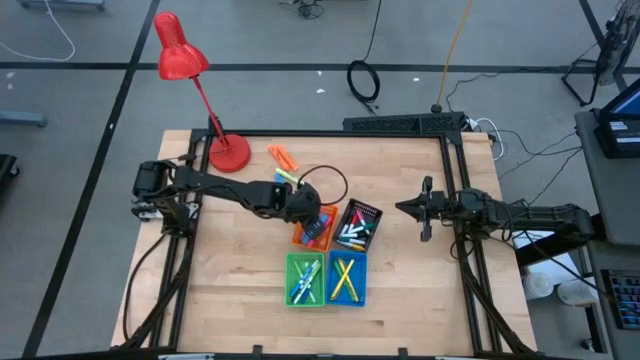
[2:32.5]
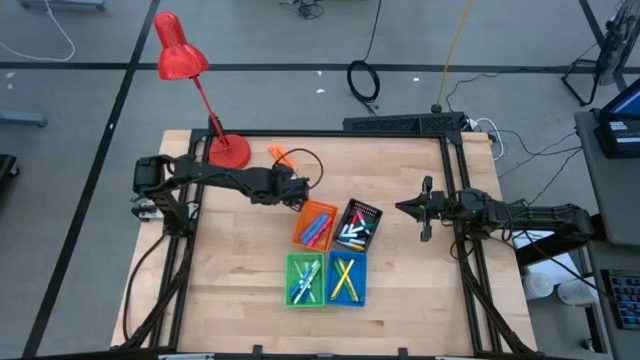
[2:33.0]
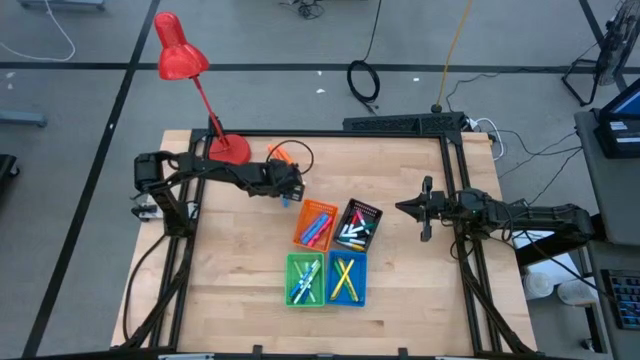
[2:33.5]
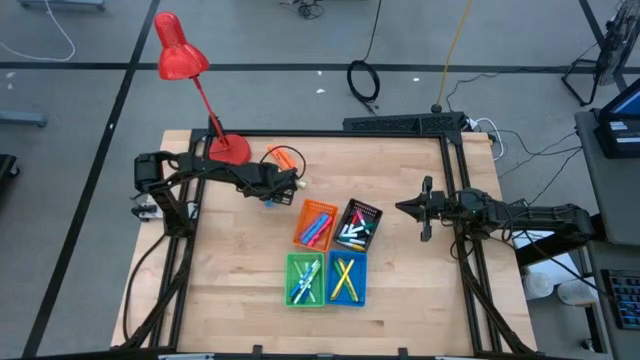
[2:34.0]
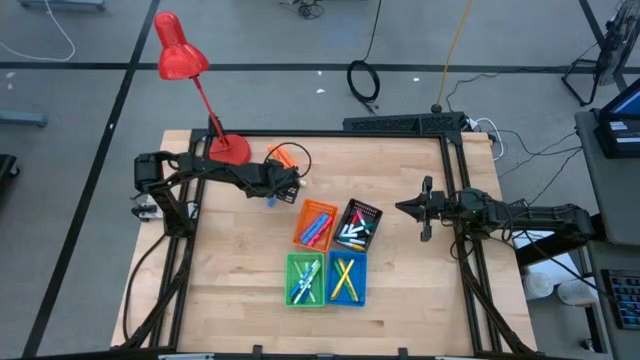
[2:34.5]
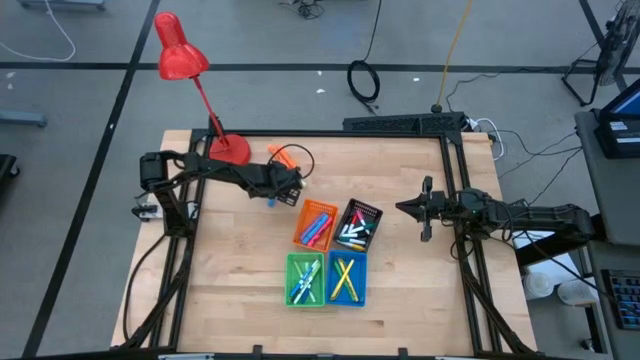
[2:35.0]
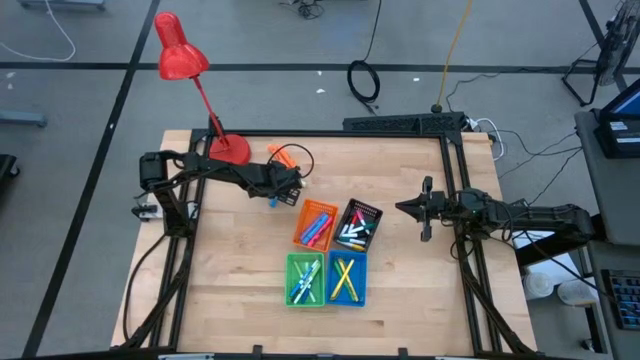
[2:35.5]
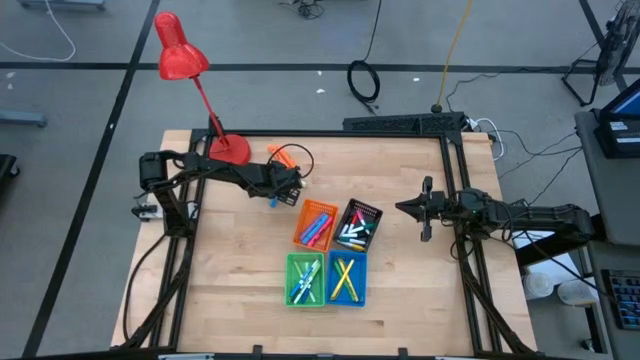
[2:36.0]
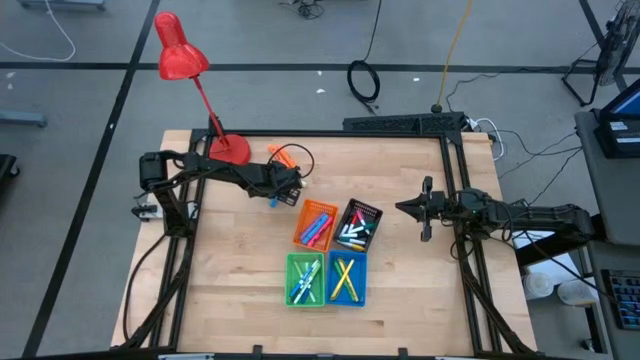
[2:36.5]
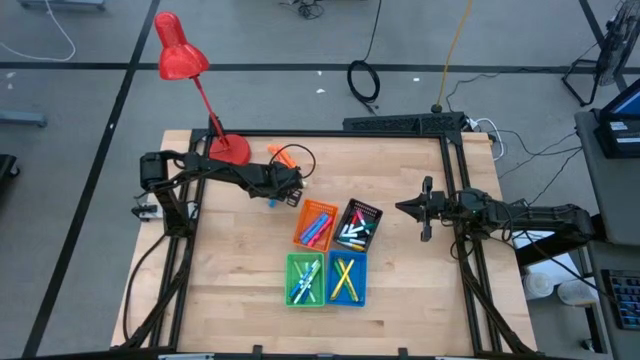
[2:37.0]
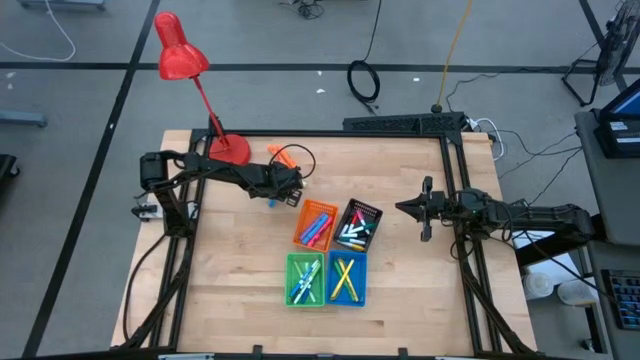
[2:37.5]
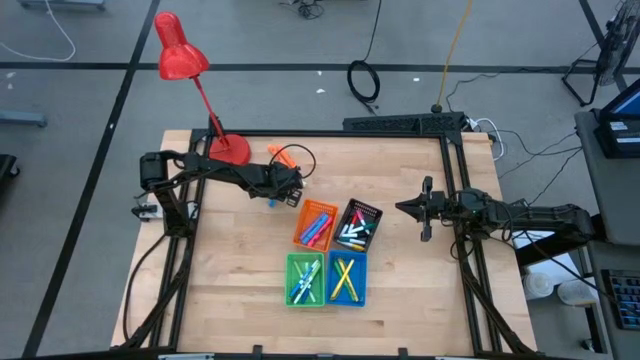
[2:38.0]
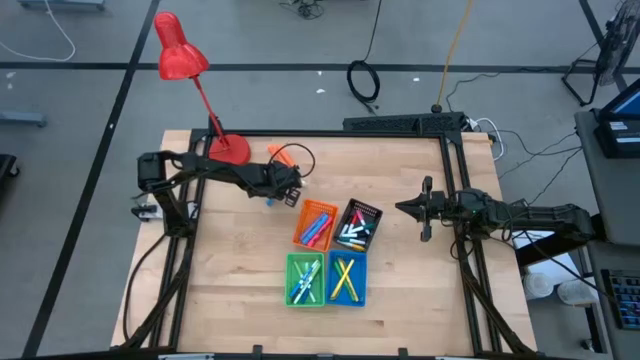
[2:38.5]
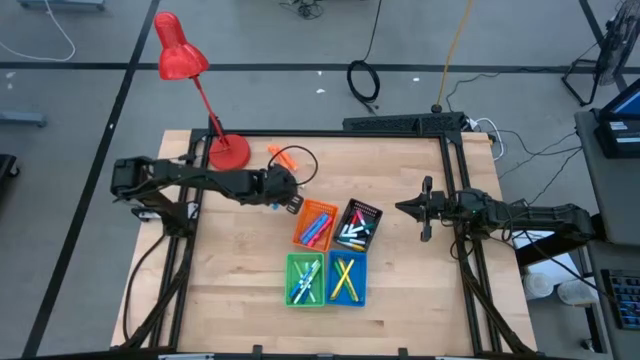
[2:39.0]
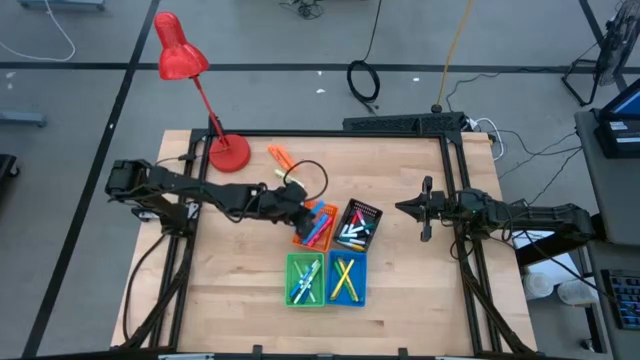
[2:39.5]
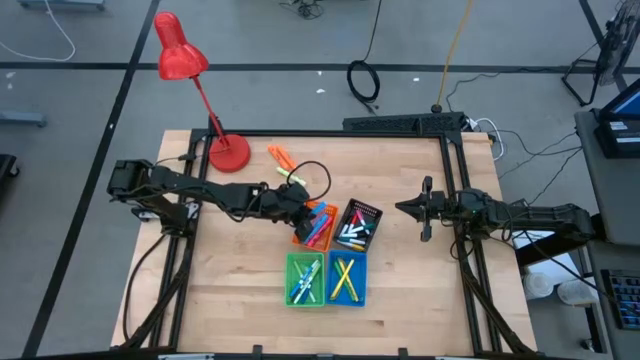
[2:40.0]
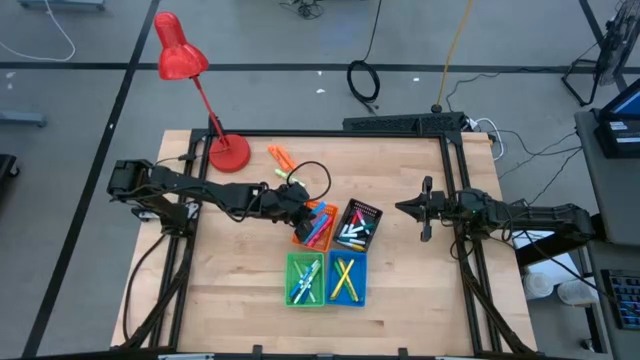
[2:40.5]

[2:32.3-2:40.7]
Task: Pick & Place Markers
Put the blue highlighter pen into the orange basket

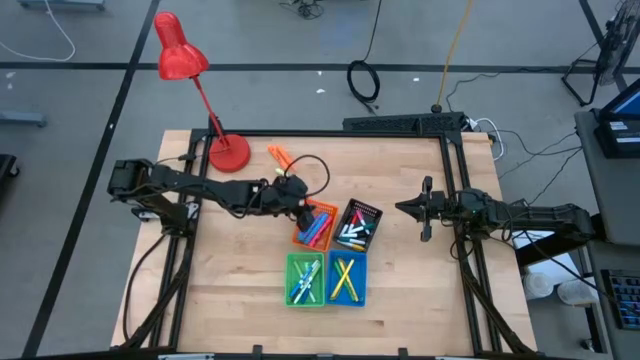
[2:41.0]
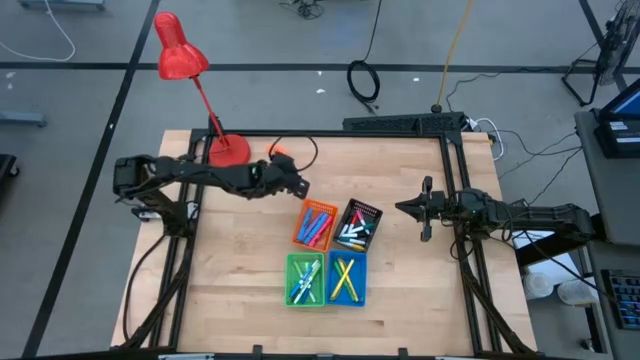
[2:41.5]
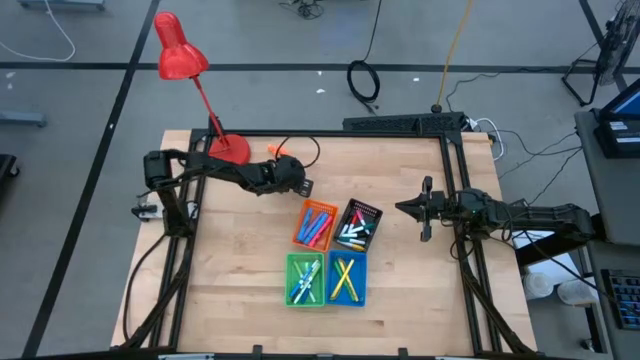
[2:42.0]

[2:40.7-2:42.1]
Put the green highlighter pen into the orange basket

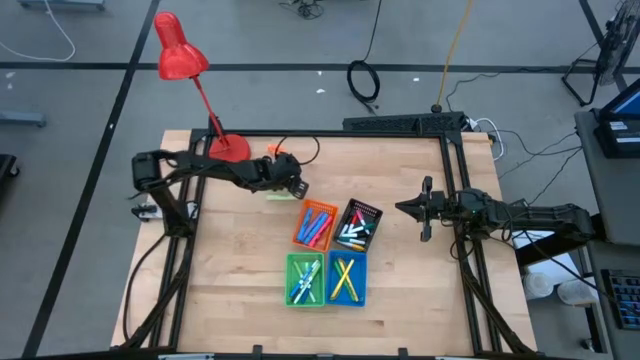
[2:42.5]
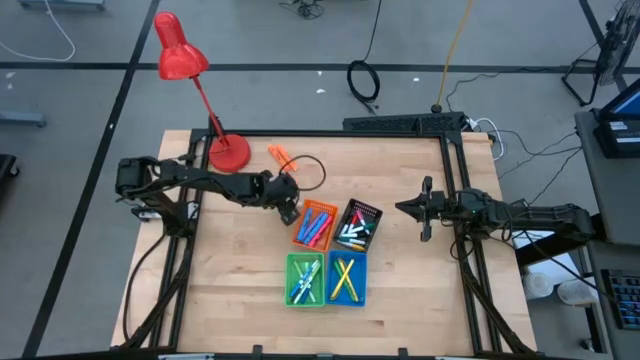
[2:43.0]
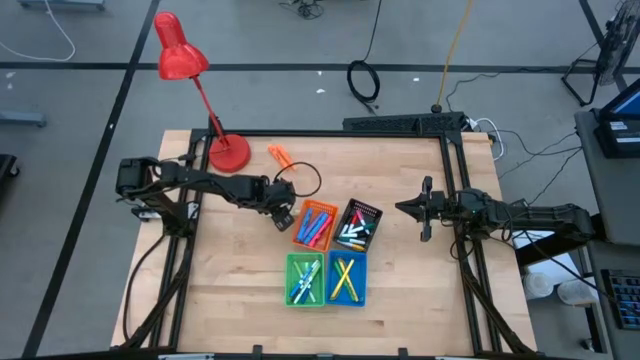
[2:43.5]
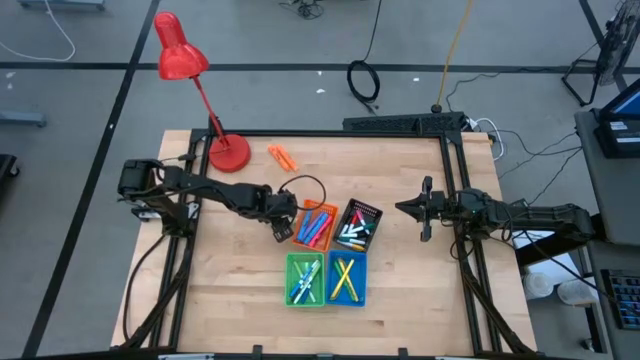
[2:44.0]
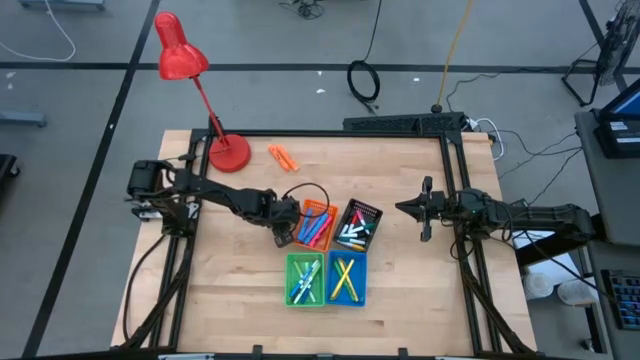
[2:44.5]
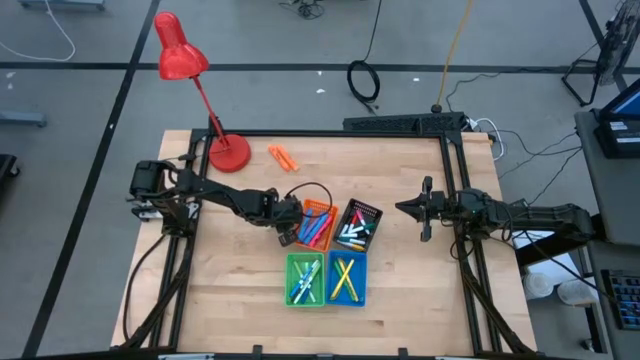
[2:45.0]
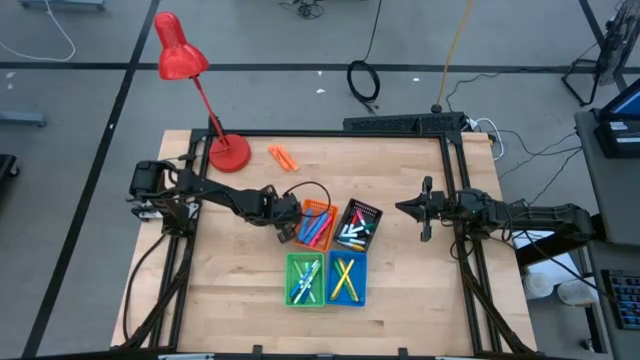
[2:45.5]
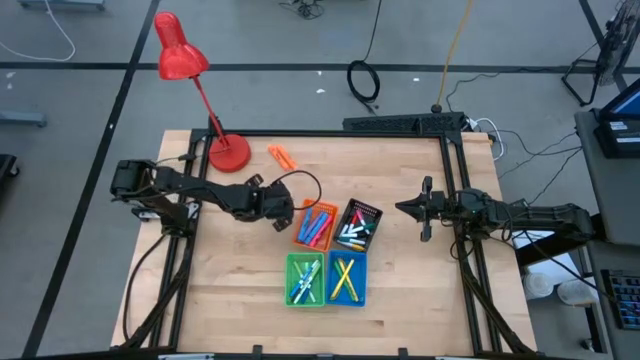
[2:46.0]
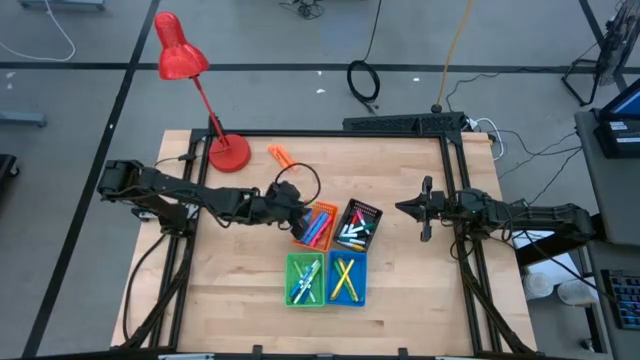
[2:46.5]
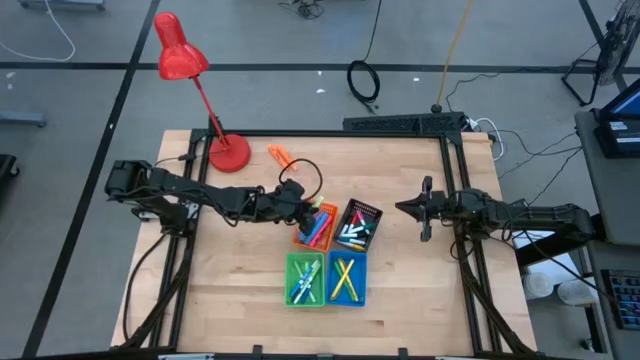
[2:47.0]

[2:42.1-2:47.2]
Put the green highlighter pen into the orange basket

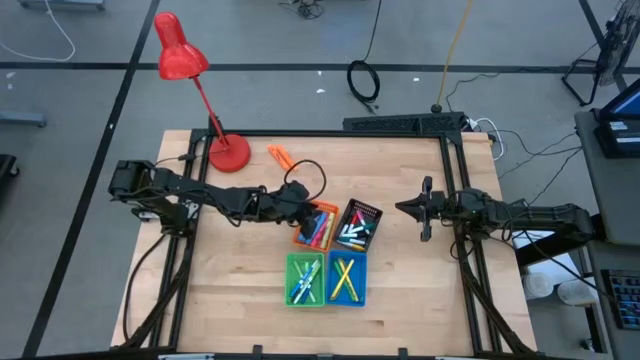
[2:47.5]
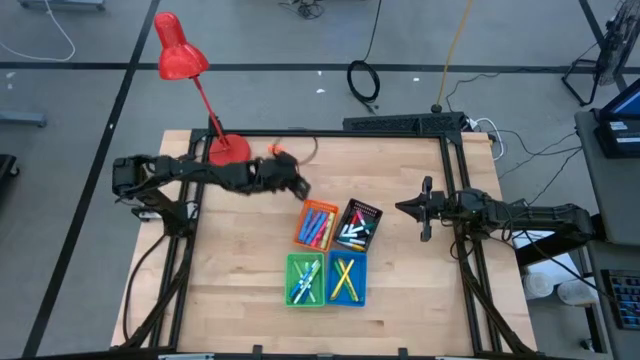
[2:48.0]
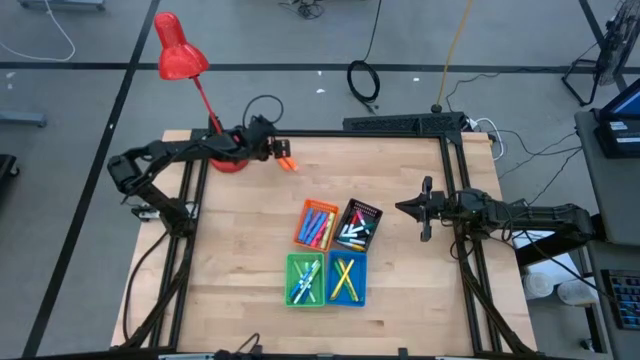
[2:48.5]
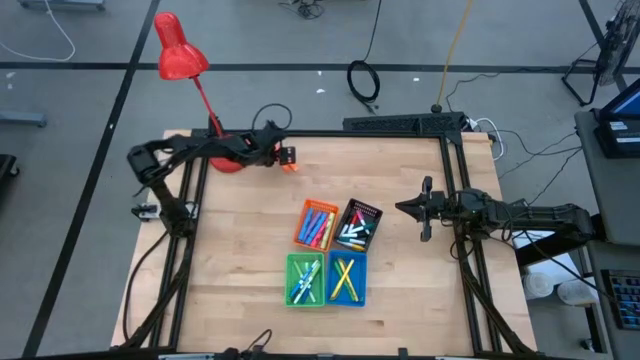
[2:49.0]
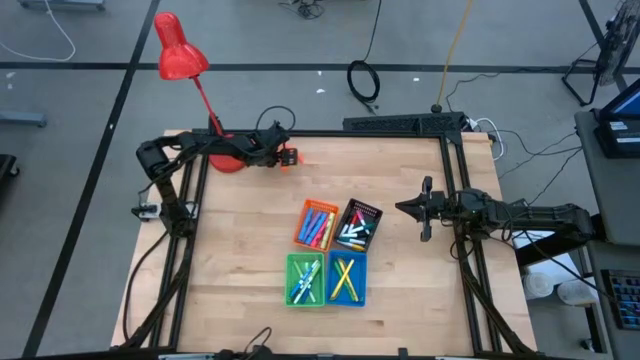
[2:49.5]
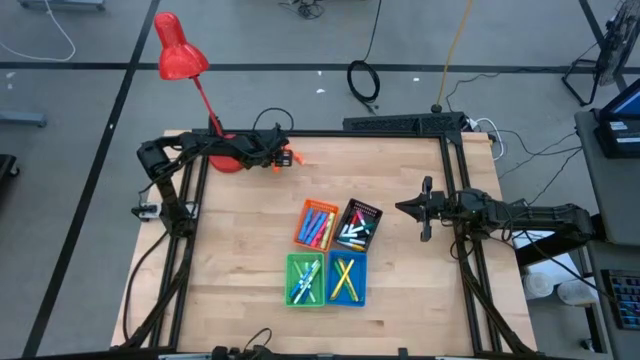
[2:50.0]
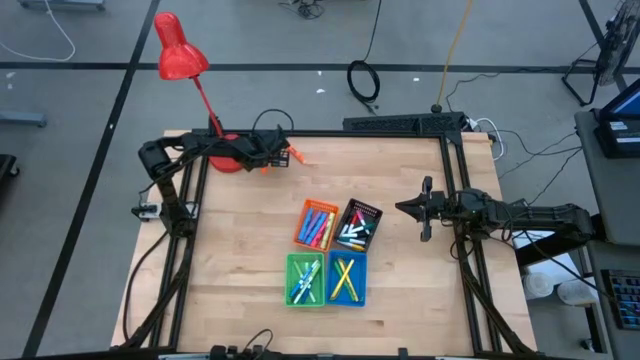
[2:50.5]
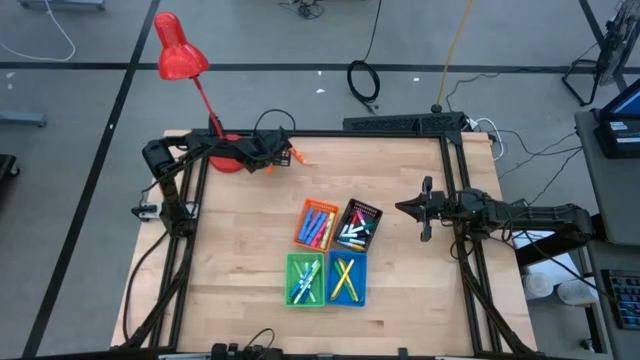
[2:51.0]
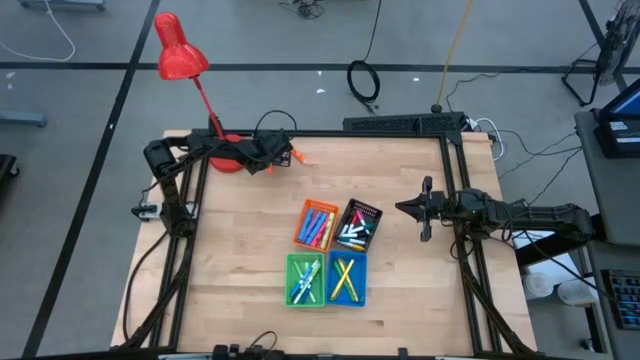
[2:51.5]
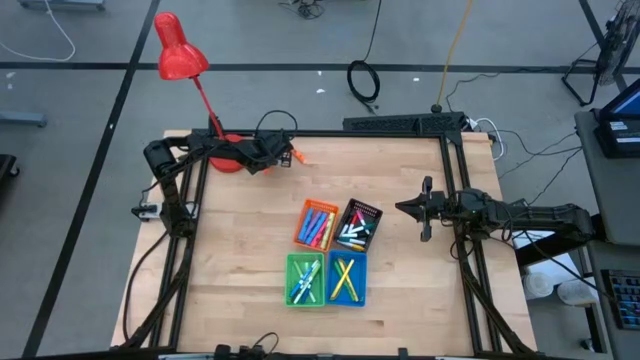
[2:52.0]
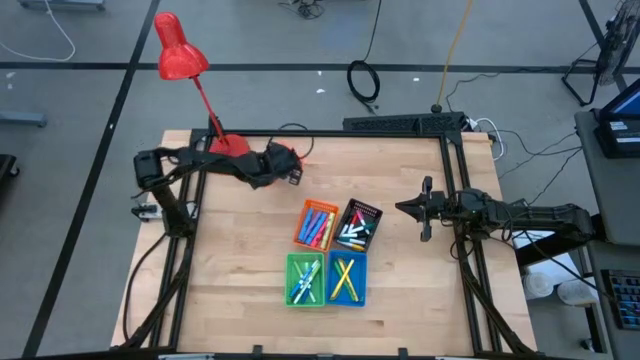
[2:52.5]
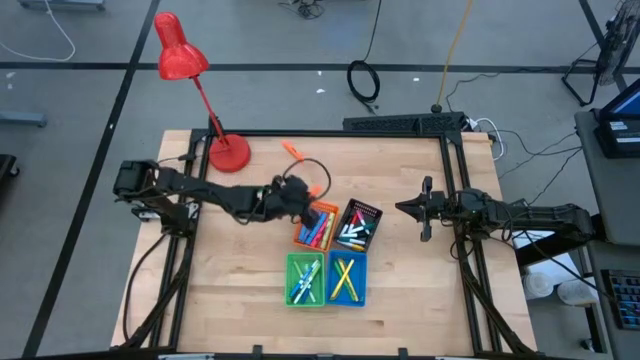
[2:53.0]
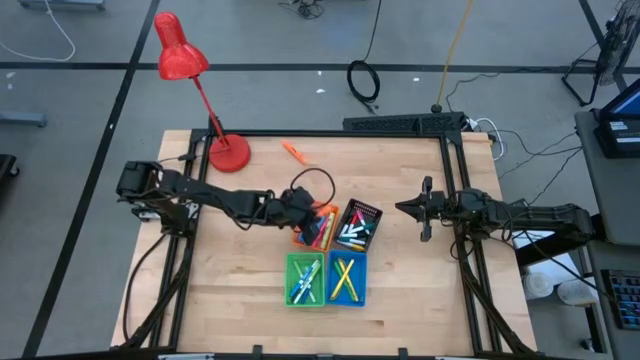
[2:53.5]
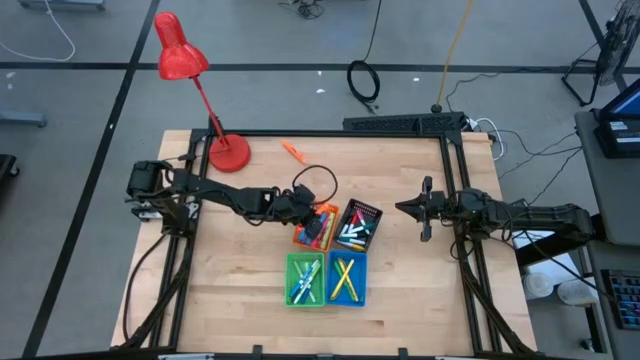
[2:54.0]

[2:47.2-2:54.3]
Put the left orange highlighter pen into the orange basket
